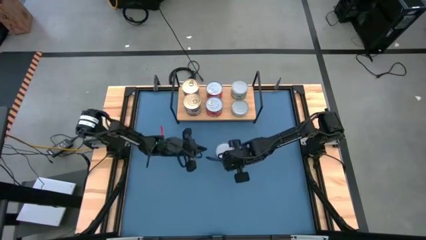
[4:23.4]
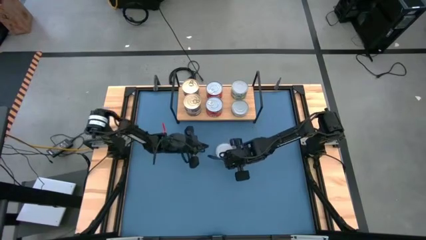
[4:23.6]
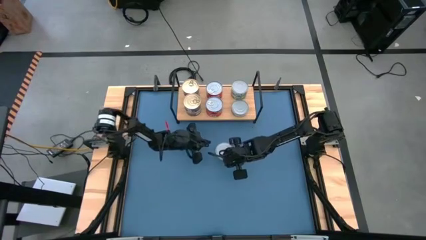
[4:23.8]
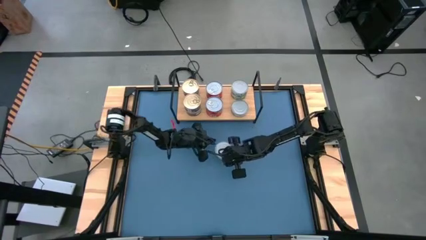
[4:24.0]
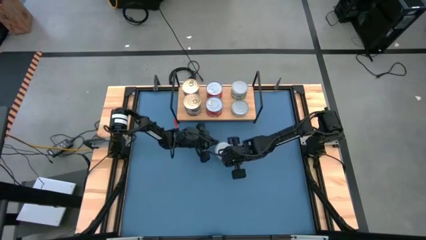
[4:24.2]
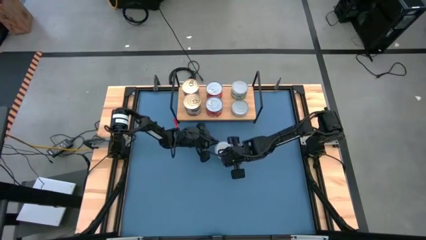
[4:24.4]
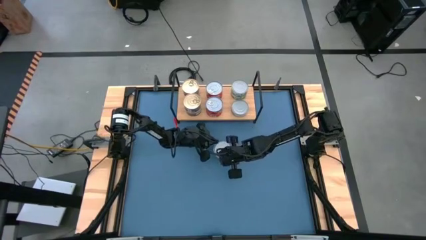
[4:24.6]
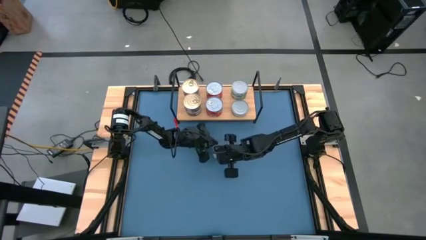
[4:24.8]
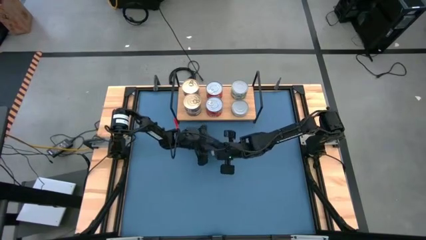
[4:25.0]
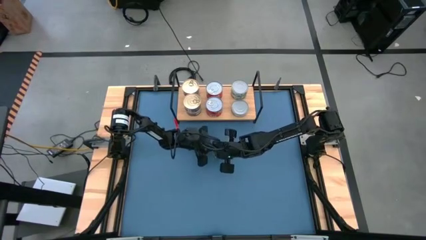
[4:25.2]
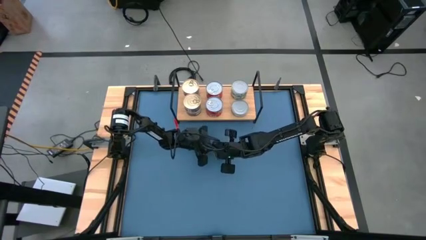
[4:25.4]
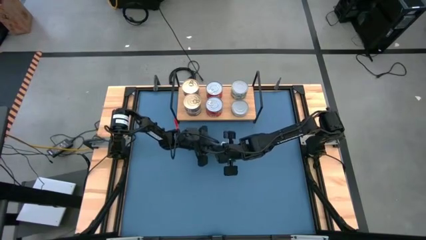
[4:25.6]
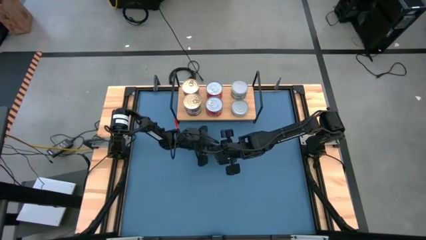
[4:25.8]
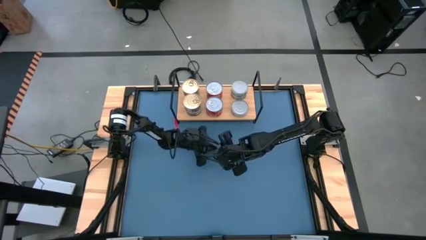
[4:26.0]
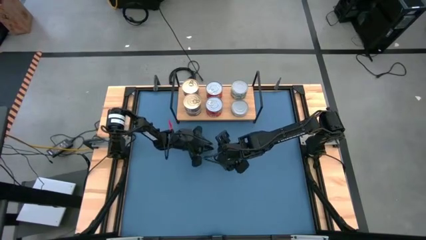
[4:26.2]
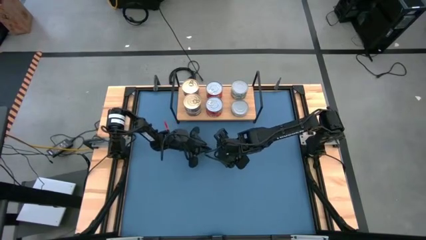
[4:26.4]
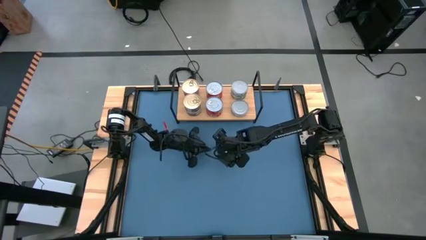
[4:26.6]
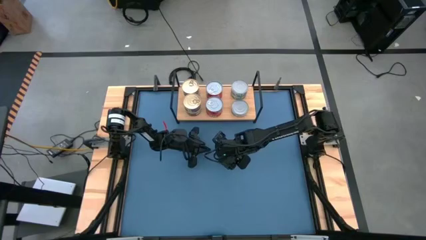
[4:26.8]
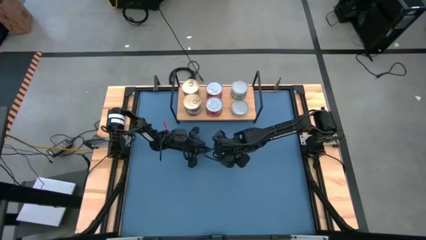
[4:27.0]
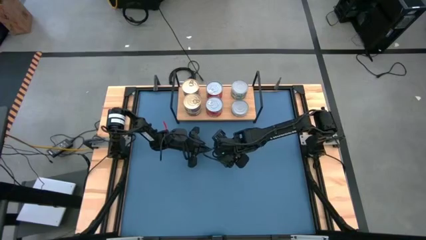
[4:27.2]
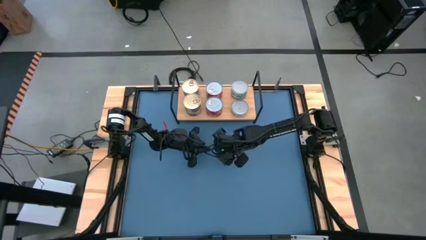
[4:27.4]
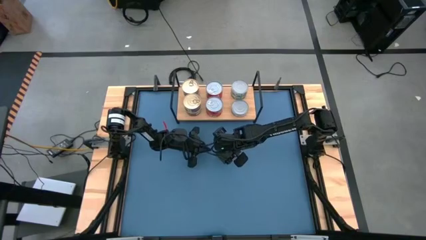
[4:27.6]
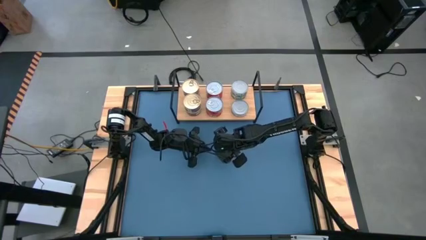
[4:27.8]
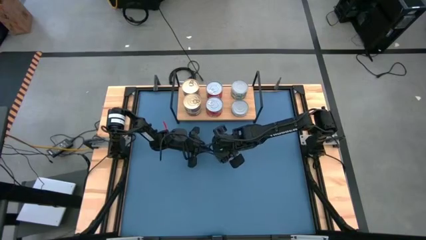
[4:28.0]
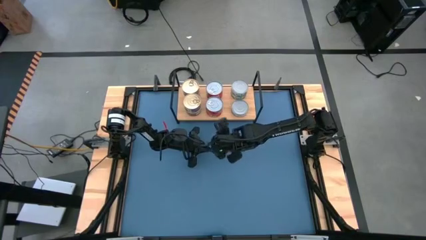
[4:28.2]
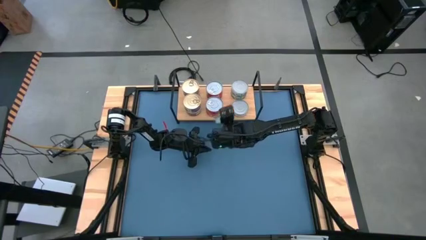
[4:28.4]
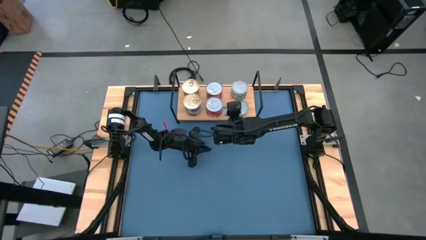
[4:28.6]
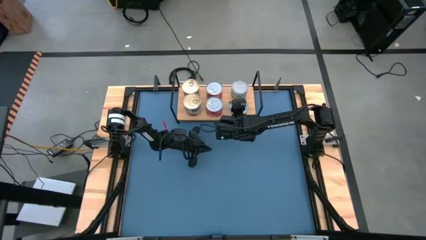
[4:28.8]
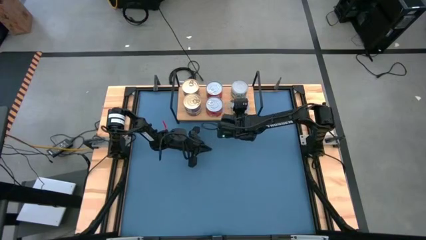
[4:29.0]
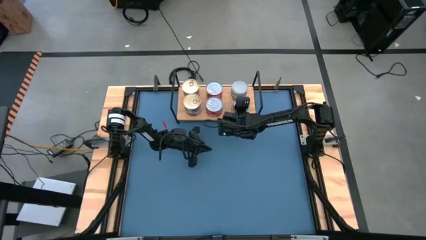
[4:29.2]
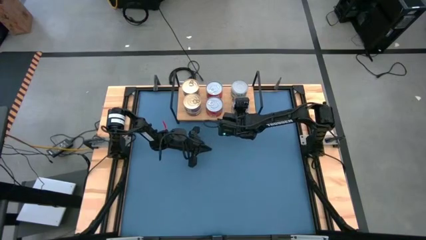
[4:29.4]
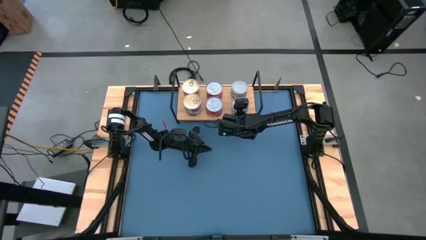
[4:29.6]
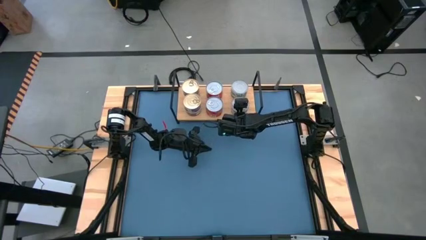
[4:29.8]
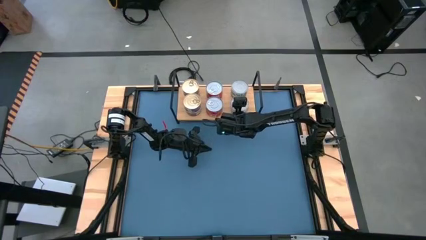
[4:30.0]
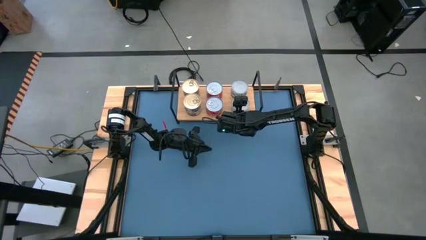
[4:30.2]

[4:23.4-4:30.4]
Task: Stack canned seafood by type on shelf
Stack the green tuna can on top of the other green tuna can on the shelf

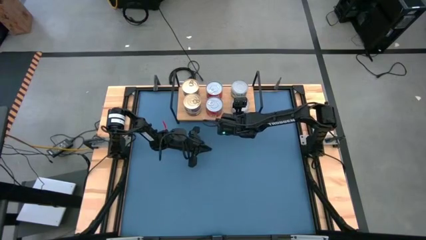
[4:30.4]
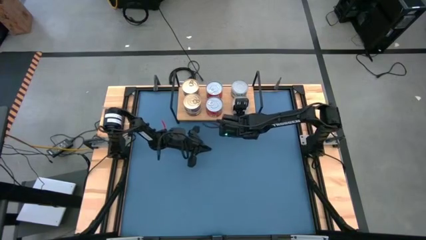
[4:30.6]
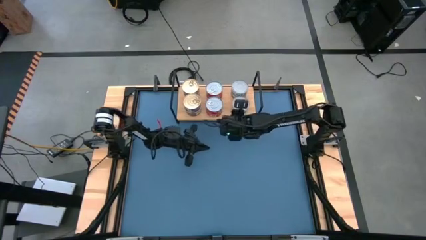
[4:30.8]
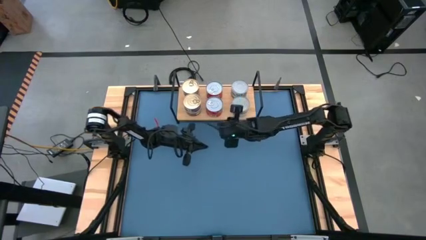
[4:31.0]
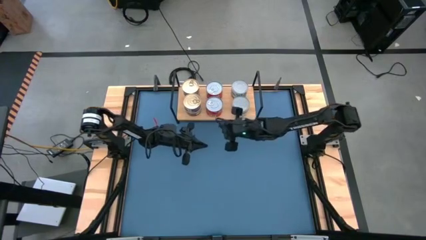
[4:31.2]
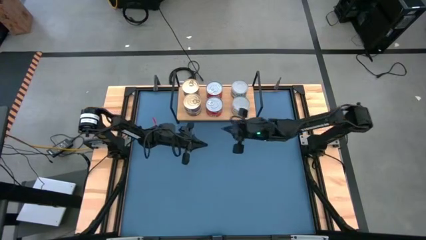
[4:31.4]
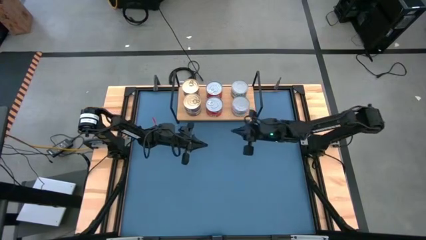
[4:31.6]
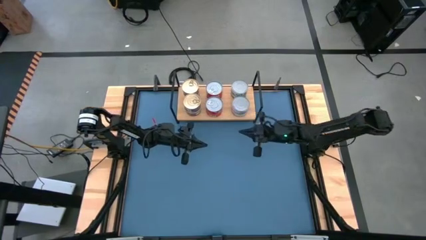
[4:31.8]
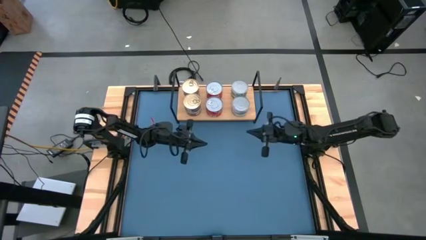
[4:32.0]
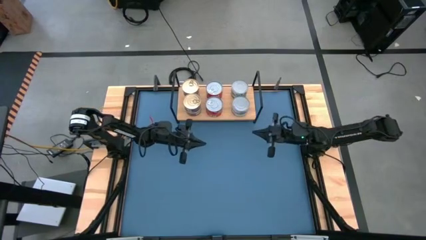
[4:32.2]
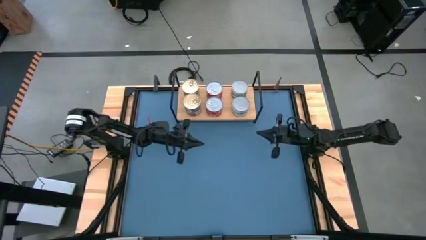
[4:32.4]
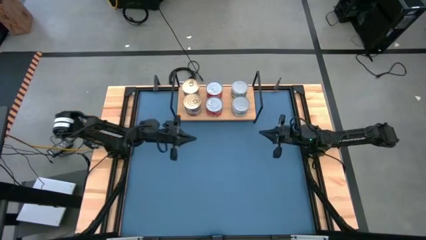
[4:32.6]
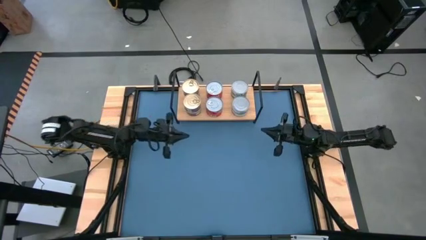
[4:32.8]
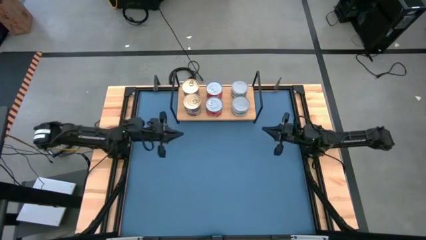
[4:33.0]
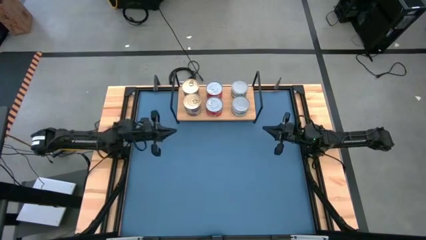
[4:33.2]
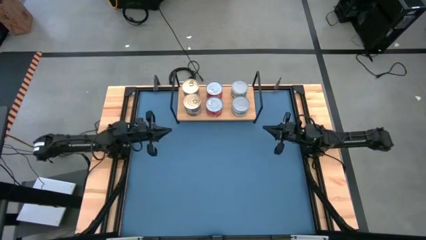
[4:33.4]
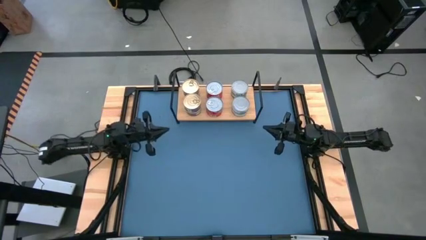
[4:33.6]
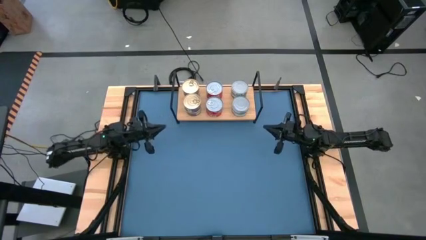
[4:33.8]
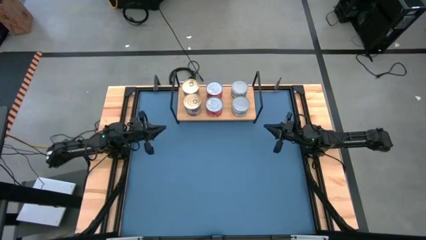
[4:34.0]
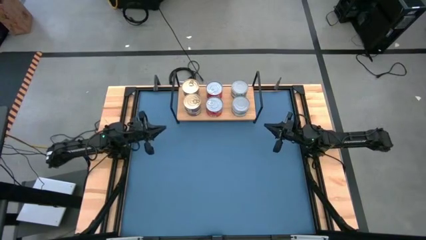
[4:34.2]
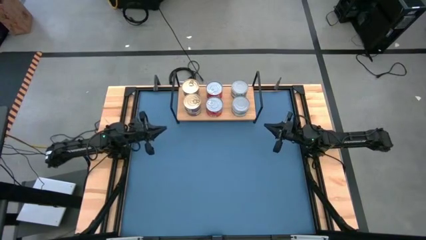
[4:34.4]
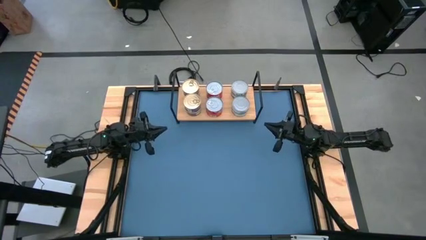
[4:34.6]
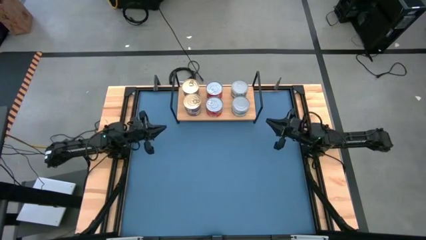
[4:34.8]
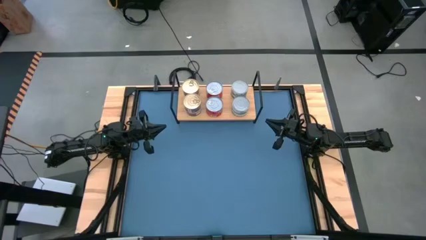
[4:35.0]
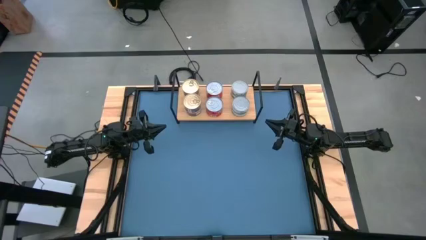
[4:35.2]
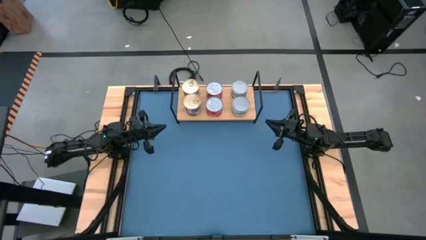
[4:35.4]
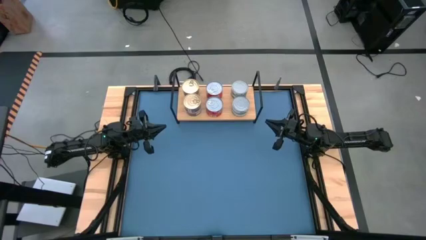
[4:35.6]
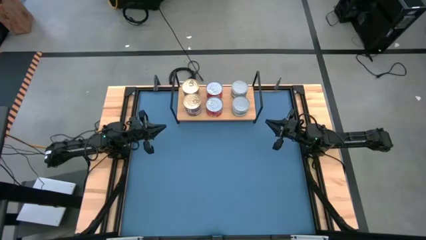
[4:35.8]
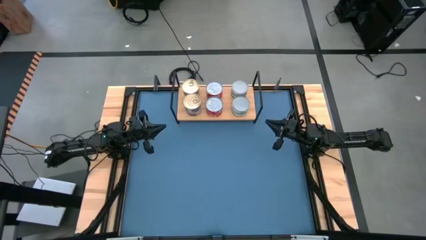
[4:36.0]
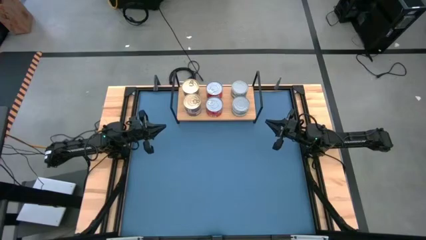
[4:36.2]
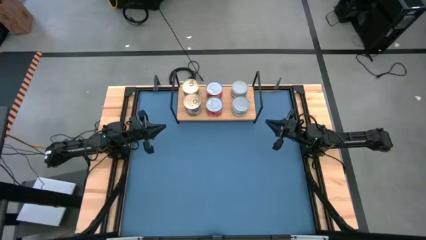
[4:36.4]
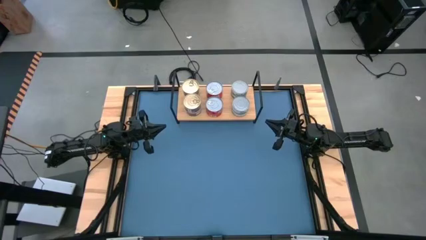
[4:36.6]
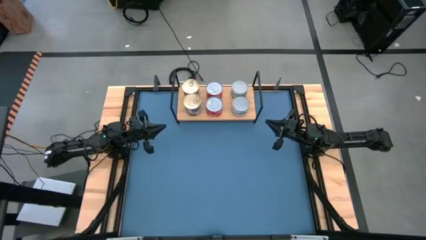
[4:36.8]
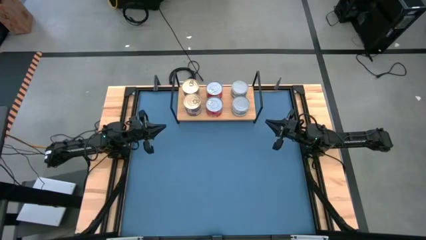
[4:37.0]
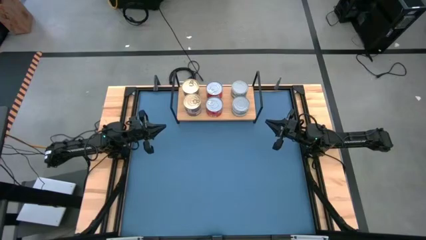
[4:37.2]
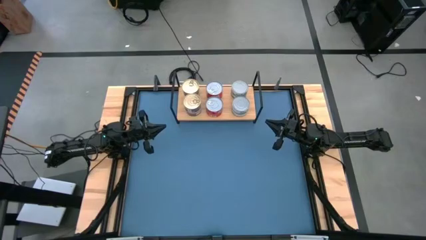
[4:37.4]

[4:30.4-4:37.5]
Return to Home Position

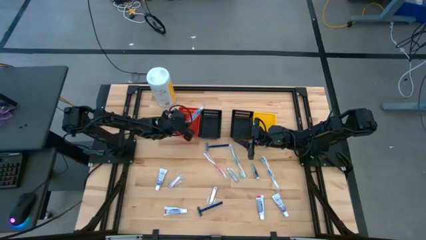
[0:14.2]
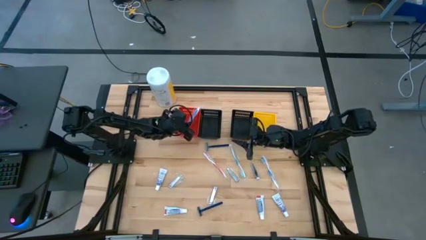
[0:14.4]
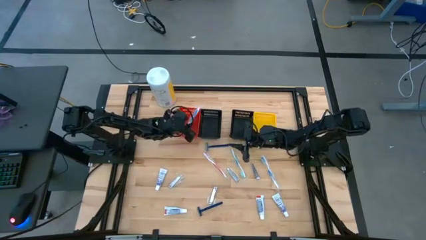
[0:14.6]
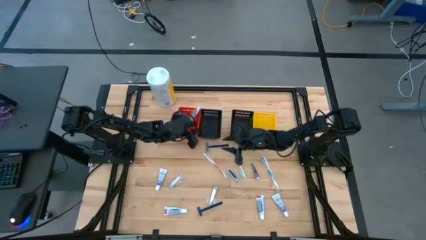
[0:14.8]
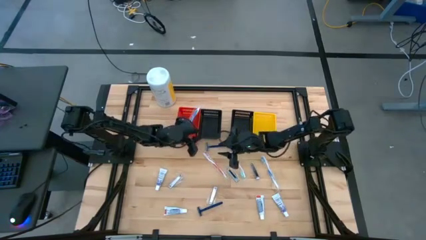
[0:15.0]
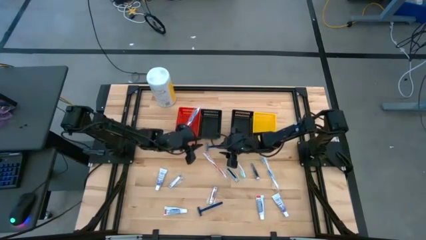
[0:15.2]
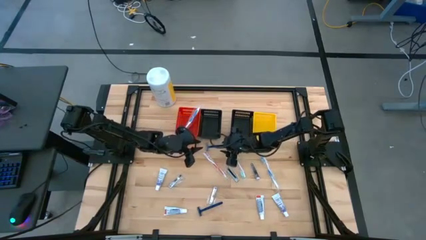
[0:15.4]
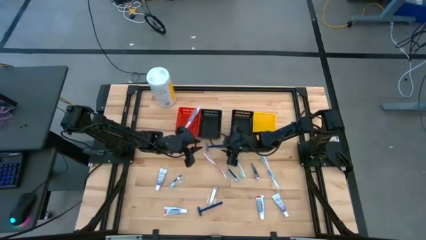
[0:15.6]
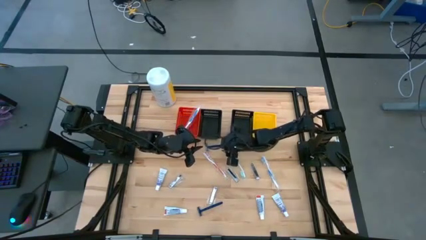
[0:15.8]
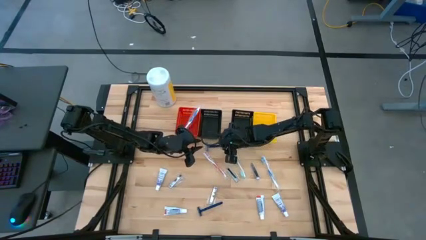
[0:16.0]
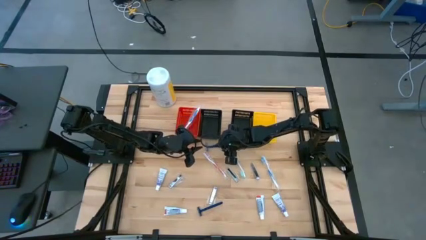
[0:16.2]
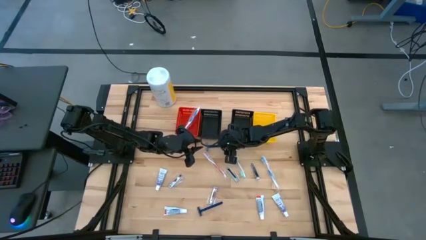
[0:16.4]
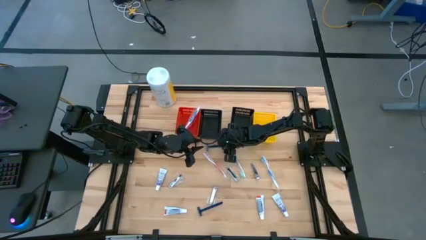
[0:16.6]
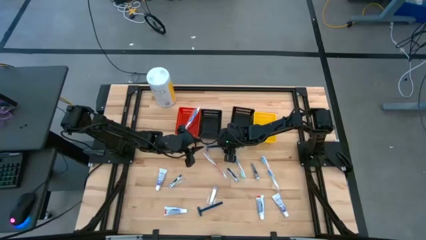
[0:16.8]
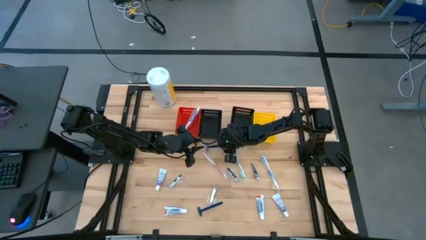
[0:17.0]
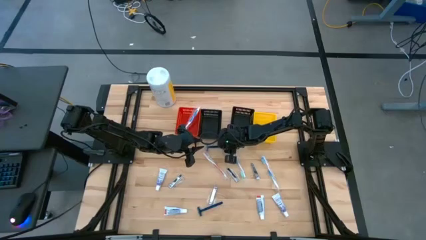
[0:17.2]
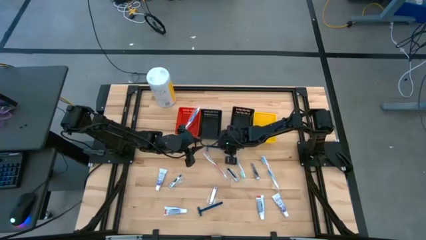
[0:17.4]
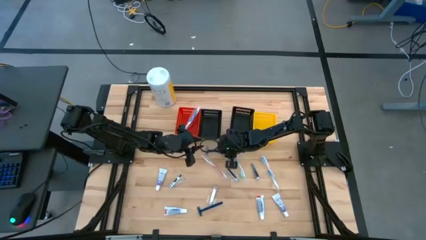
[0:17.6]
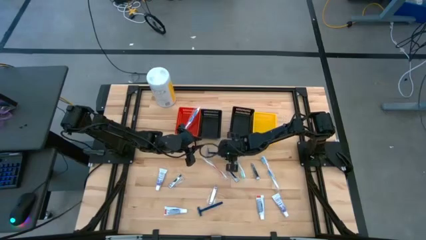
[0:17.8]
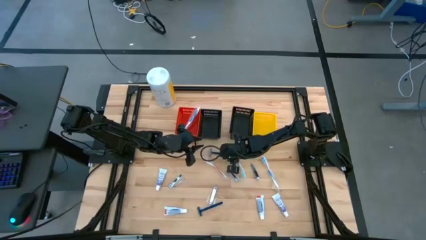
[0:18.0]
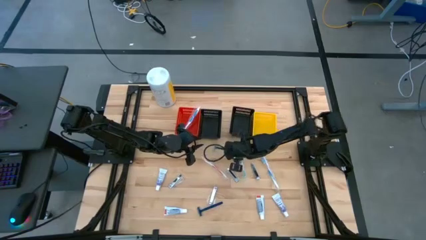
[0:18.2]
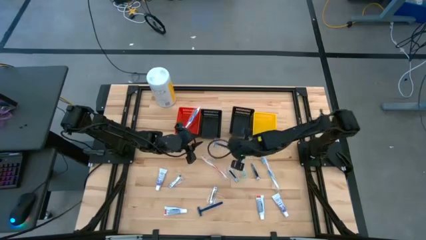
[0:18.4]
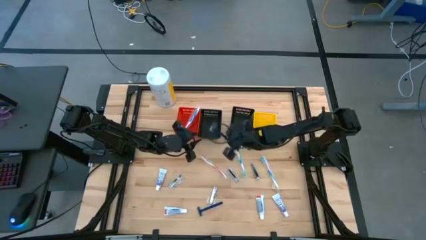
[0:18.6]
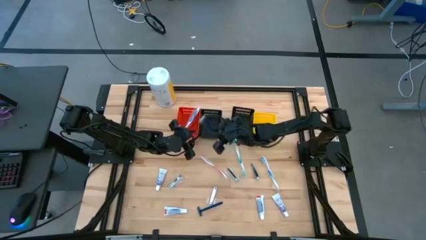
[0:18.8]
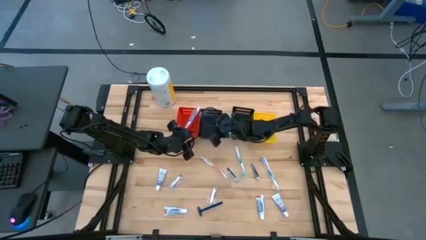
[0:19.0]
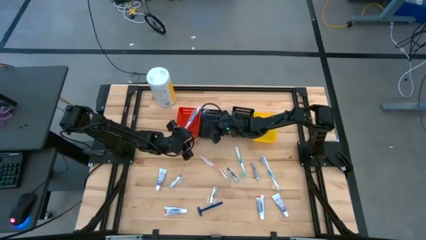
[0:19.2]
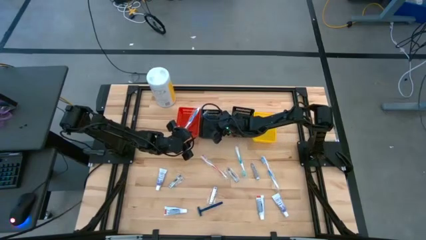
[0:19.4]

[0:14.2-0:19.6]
Task: Pick & Place Travel size toiletries
Put the blue razor into the left black basket
